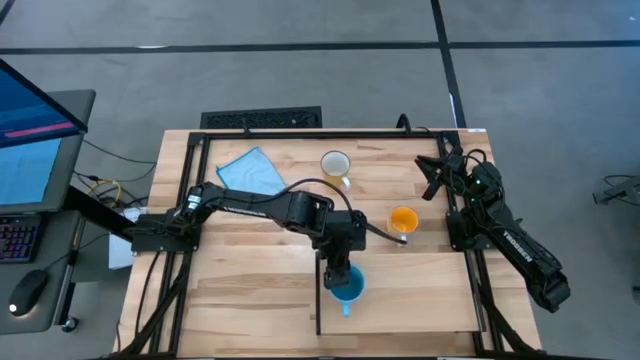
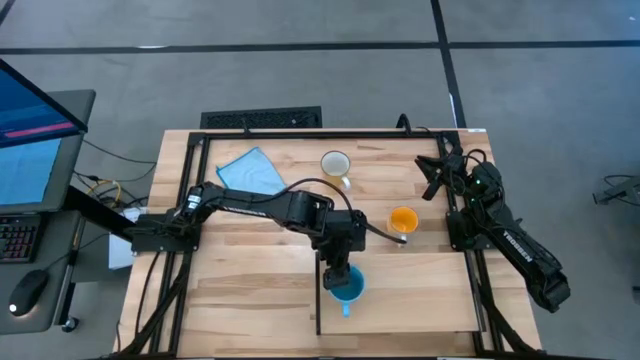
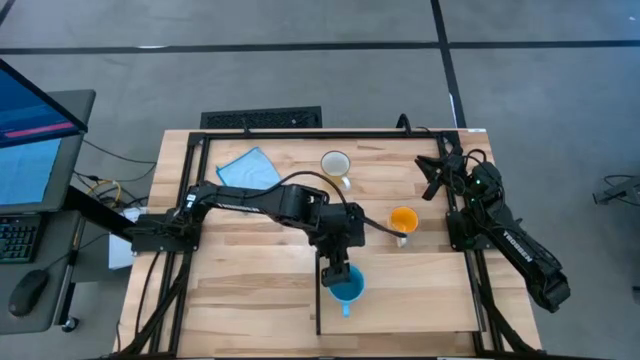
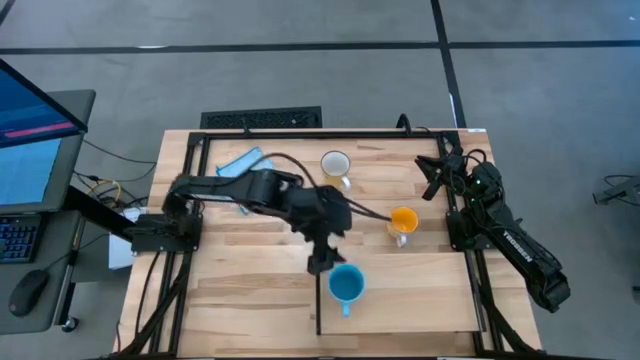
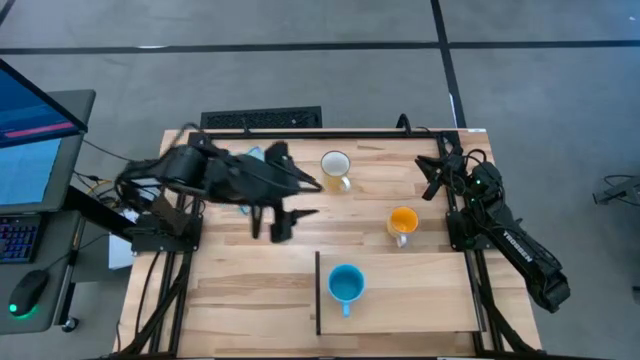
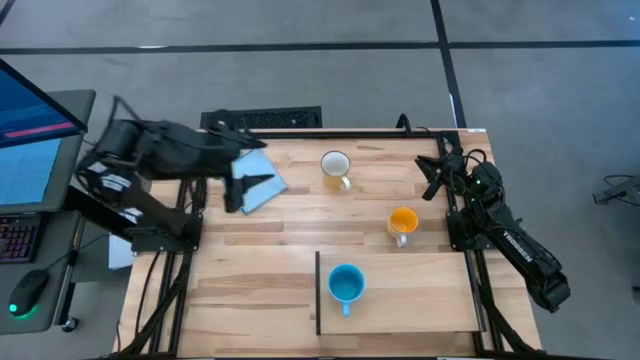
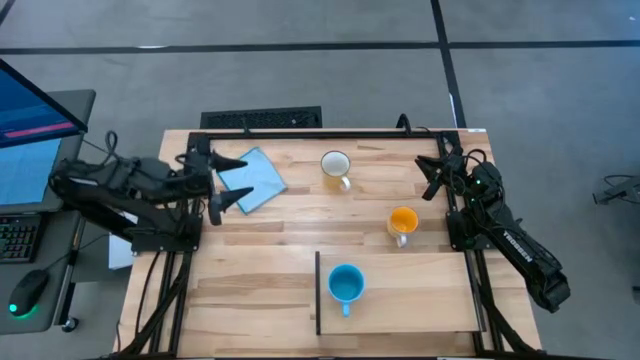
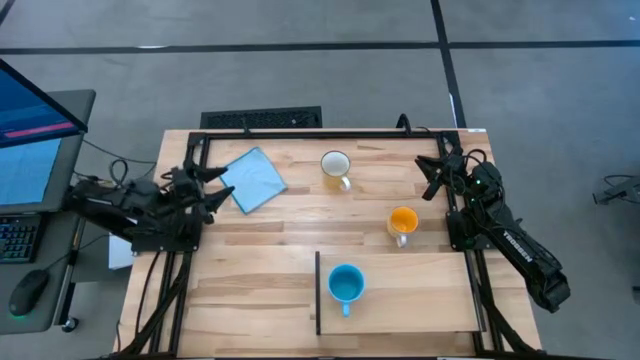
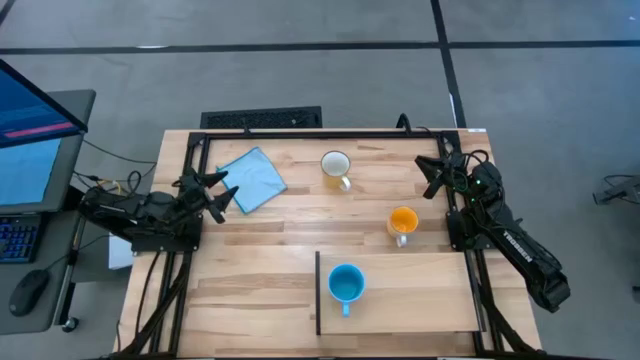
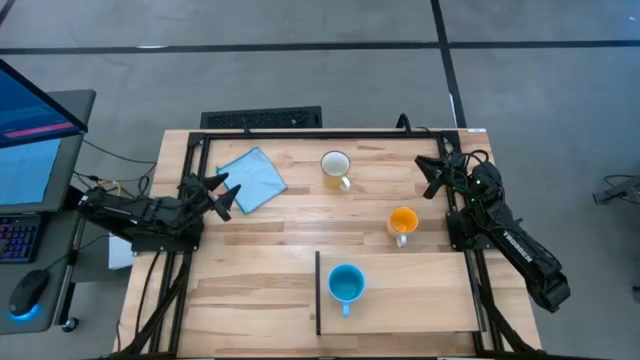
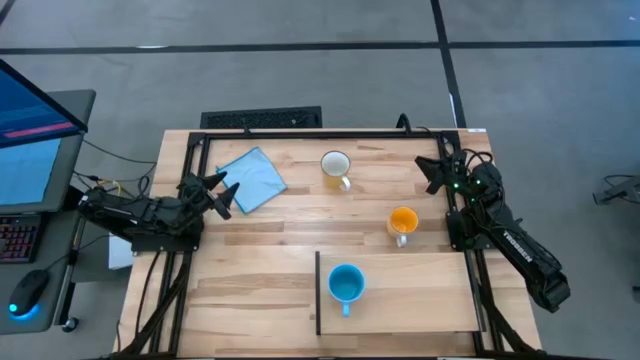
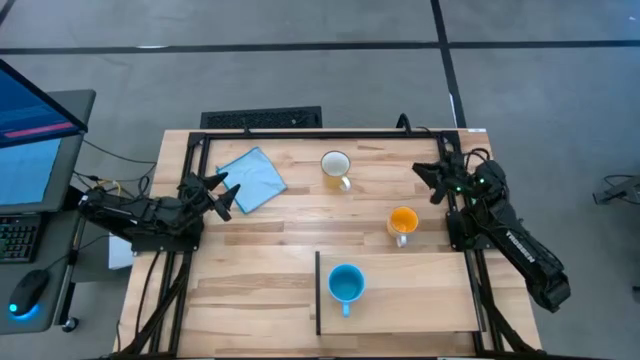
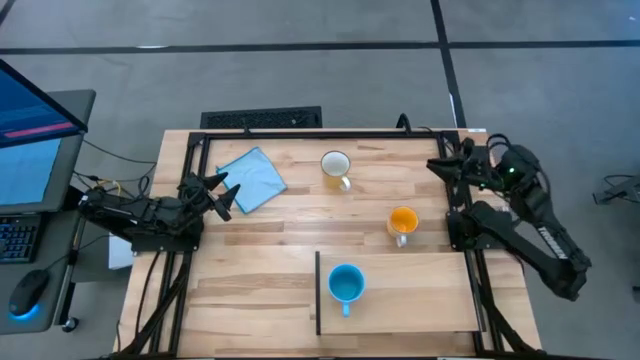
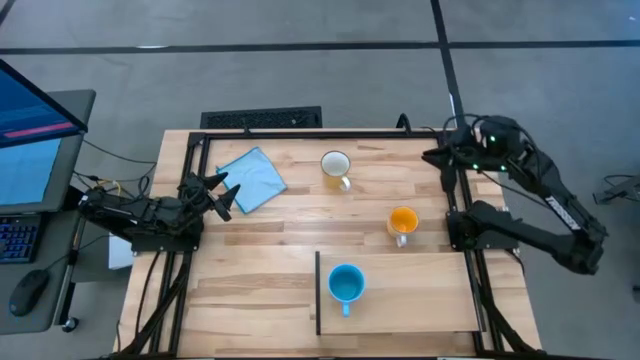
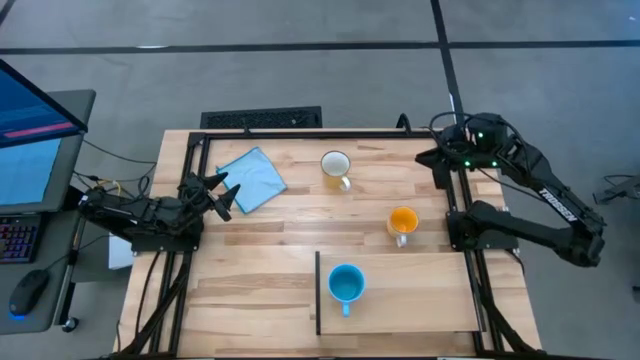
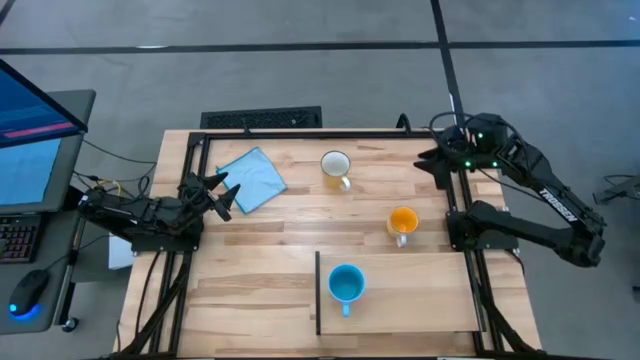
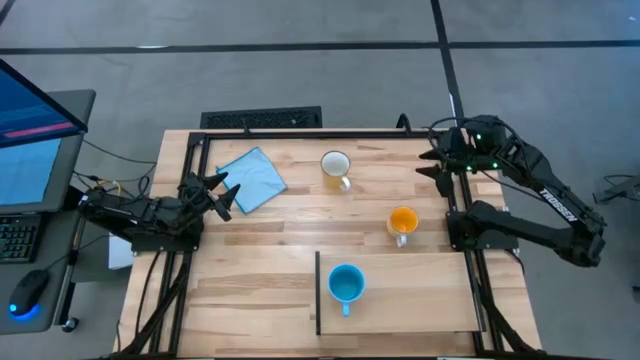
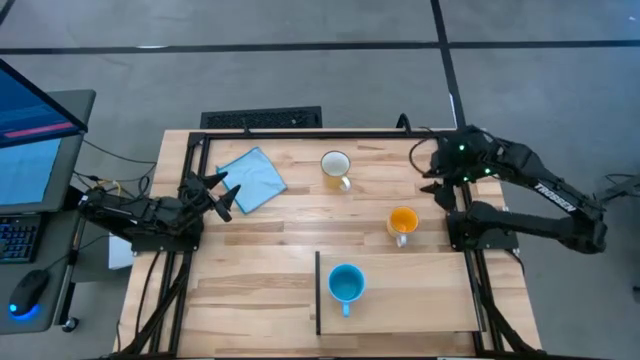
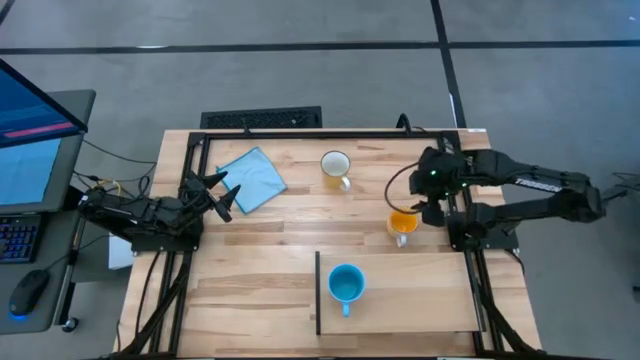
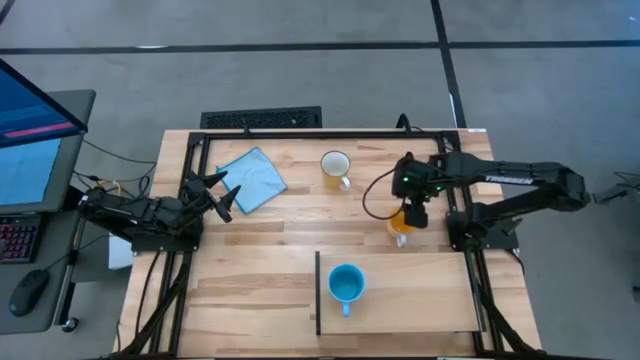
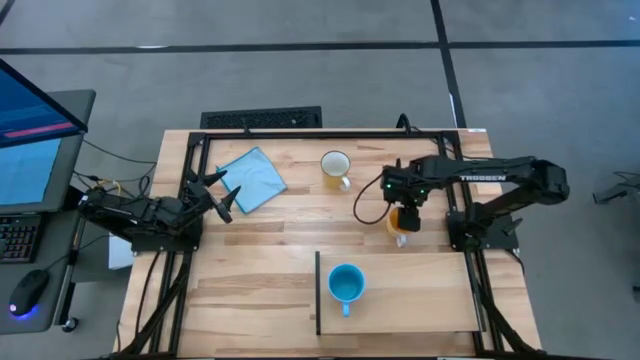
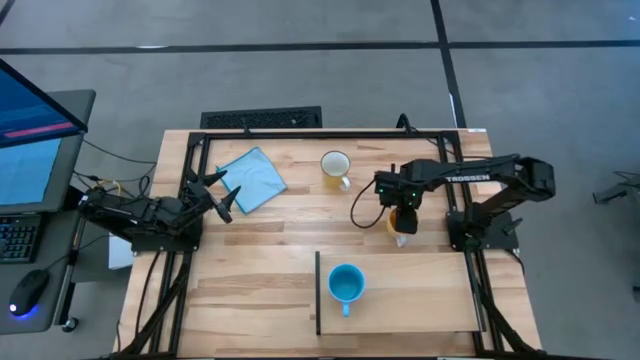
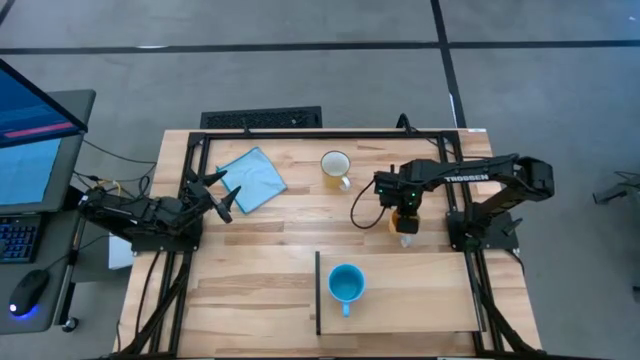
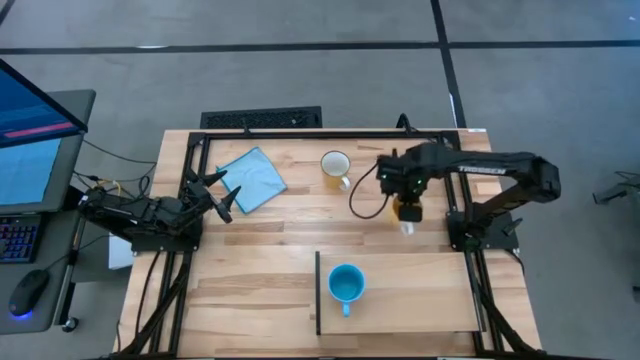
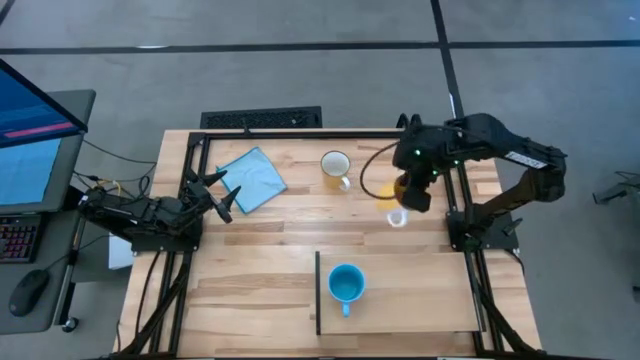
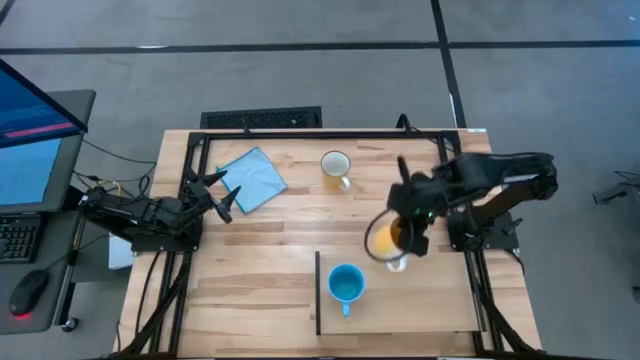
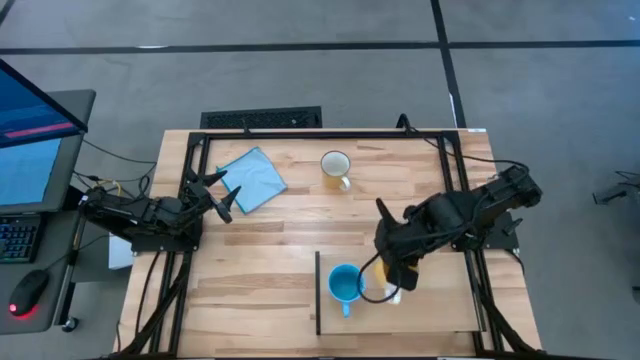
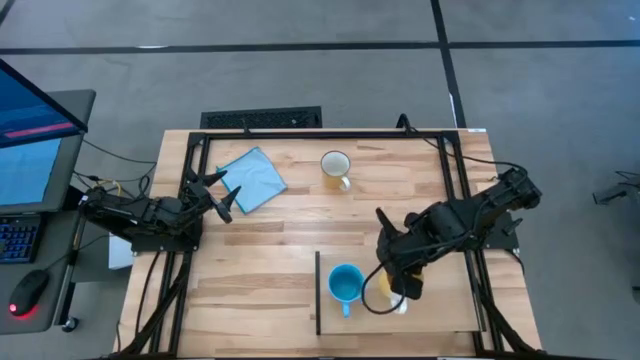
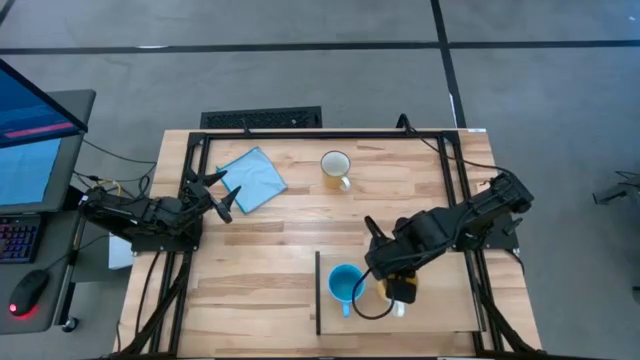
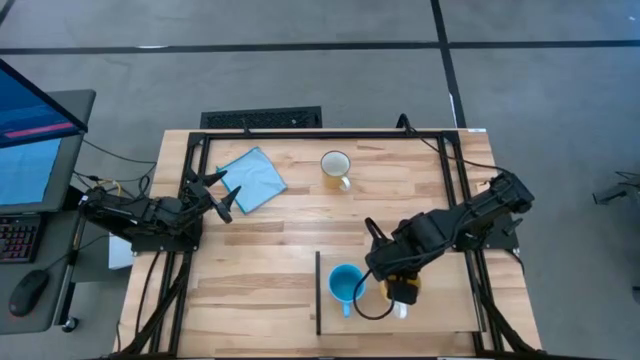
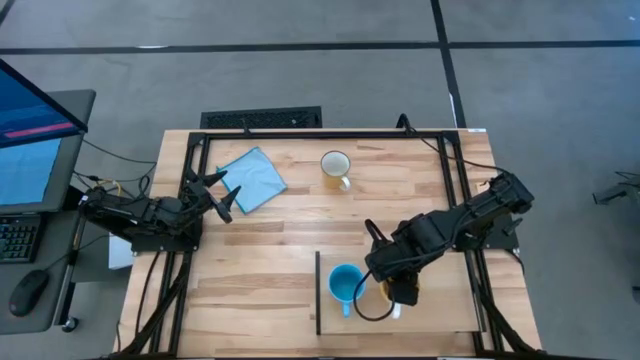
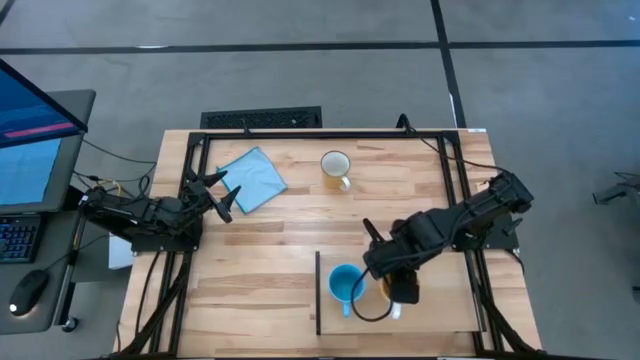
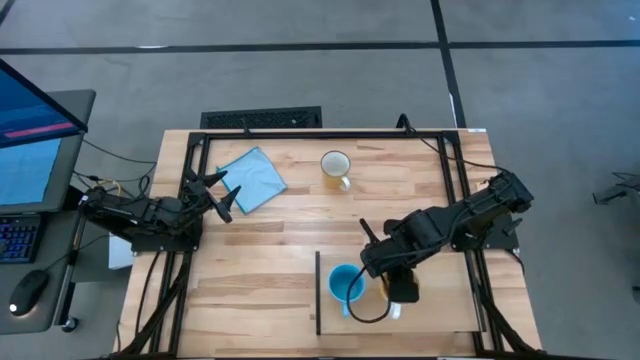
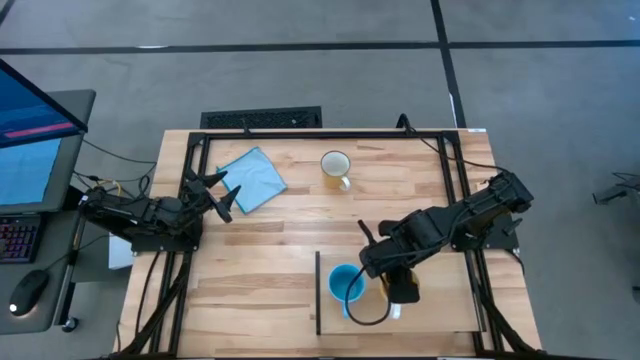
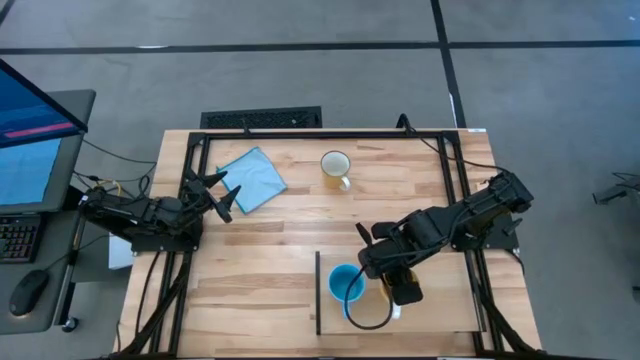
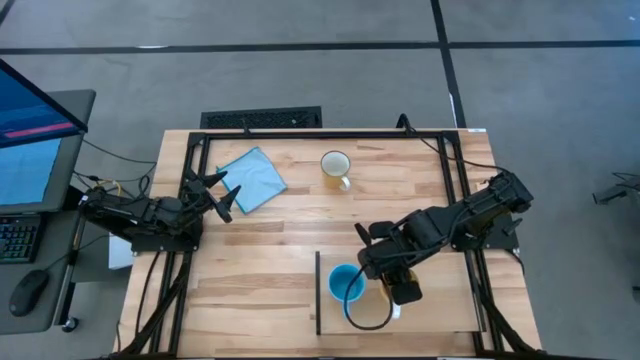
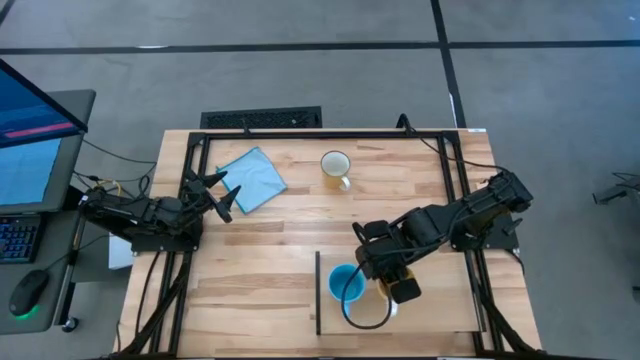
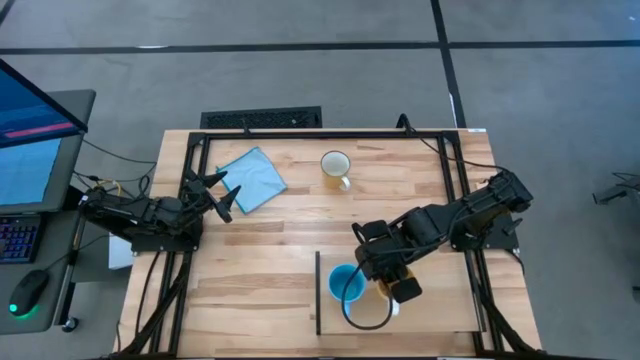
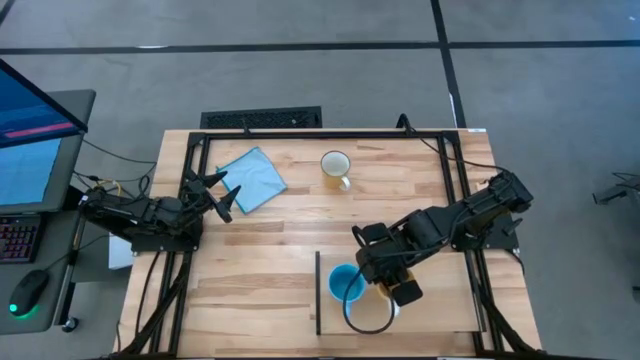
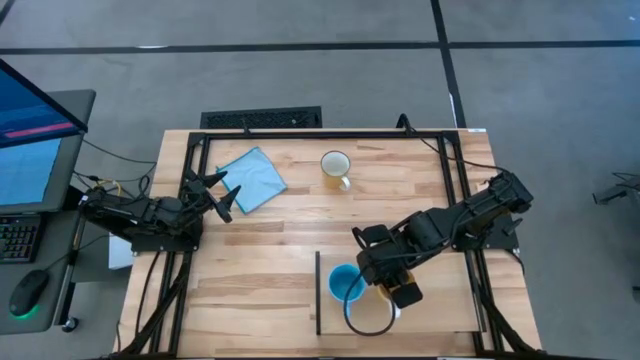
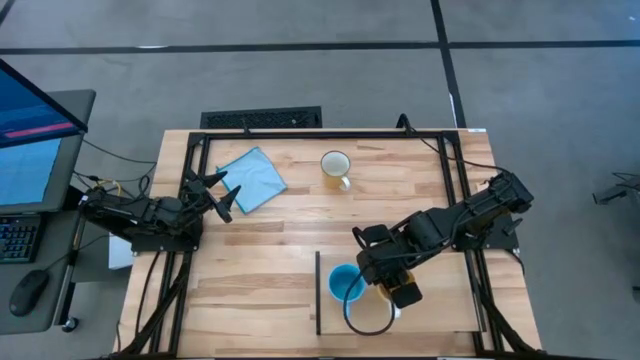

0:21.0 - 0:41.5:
Task: Stack small to large cups/mugs on shelf
Put the yellow mug on the shelf
